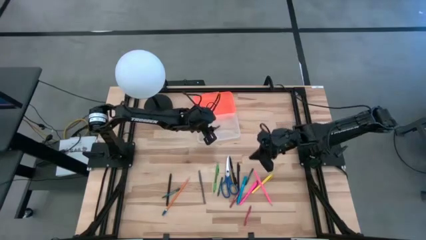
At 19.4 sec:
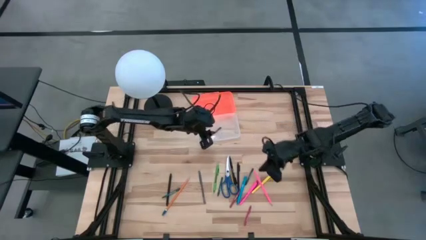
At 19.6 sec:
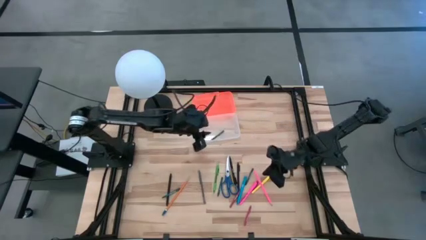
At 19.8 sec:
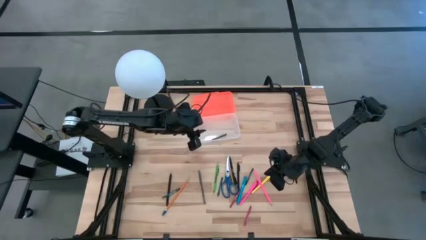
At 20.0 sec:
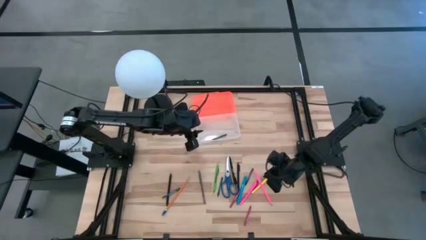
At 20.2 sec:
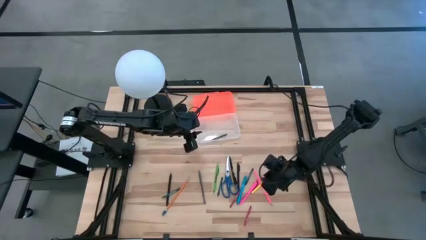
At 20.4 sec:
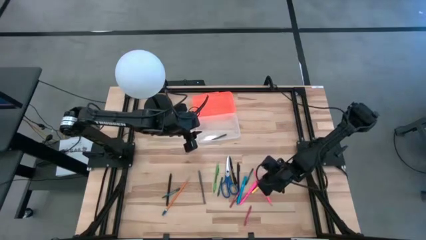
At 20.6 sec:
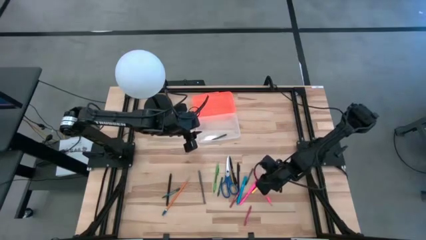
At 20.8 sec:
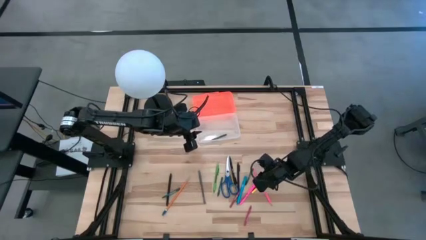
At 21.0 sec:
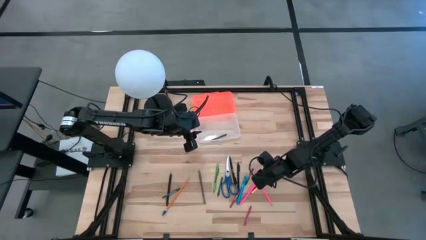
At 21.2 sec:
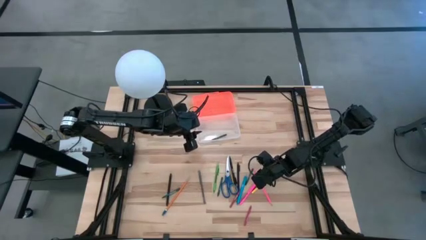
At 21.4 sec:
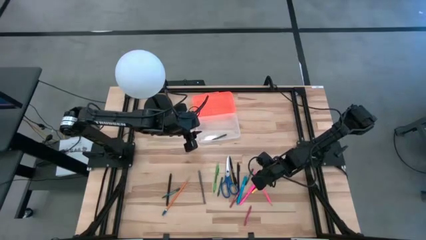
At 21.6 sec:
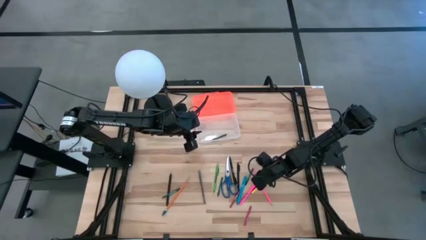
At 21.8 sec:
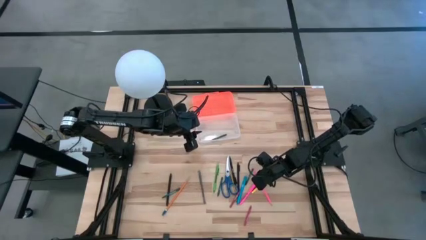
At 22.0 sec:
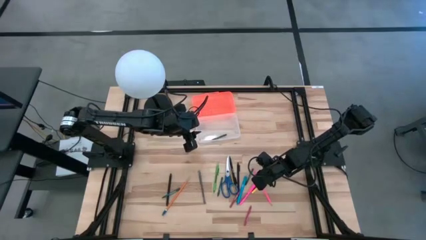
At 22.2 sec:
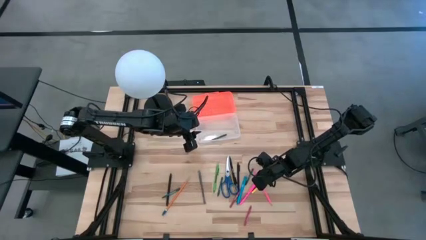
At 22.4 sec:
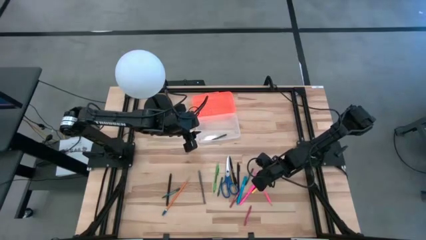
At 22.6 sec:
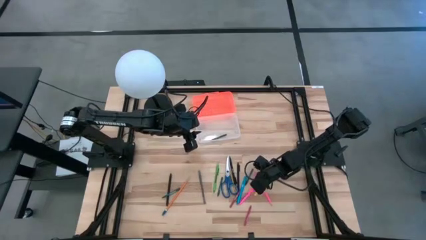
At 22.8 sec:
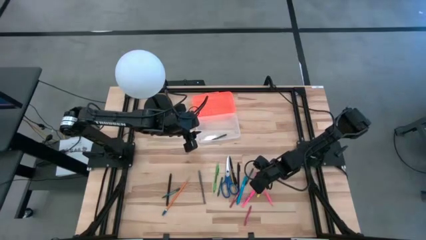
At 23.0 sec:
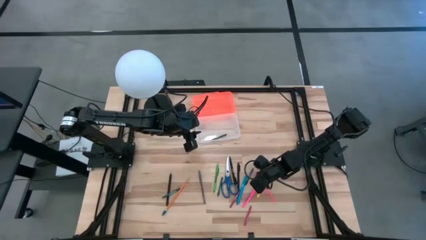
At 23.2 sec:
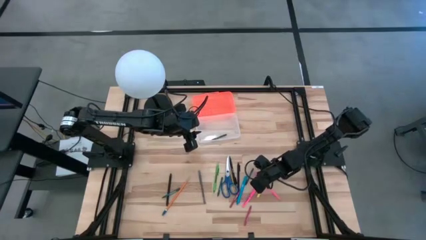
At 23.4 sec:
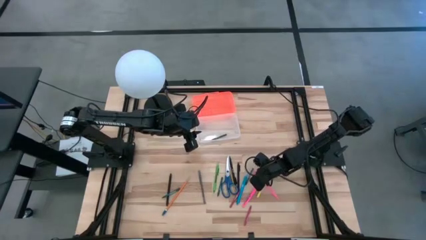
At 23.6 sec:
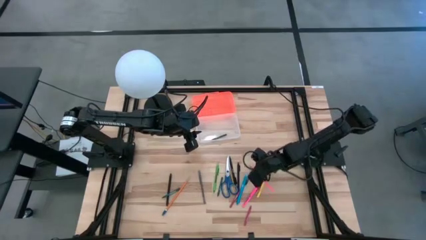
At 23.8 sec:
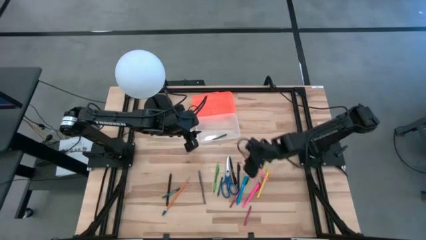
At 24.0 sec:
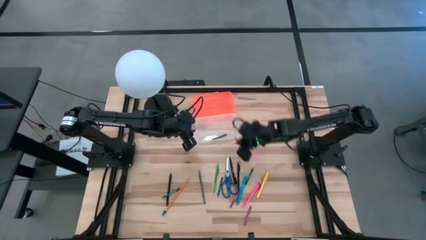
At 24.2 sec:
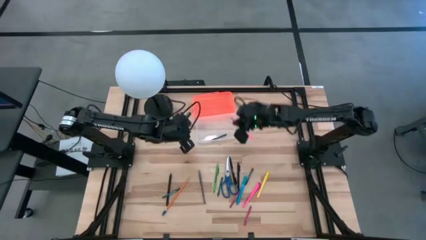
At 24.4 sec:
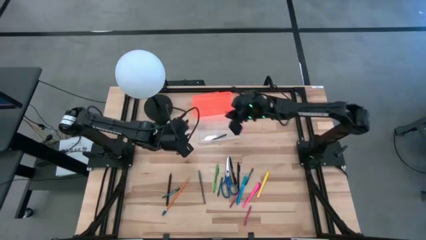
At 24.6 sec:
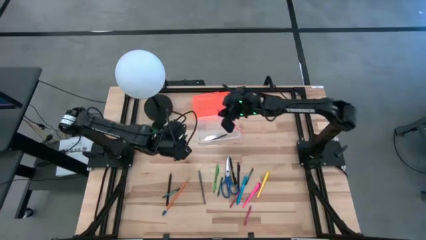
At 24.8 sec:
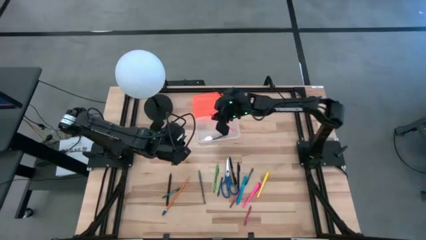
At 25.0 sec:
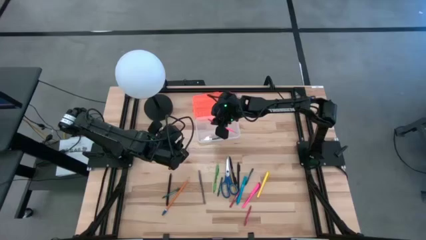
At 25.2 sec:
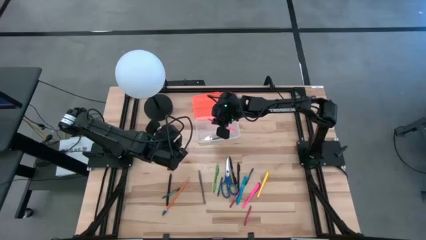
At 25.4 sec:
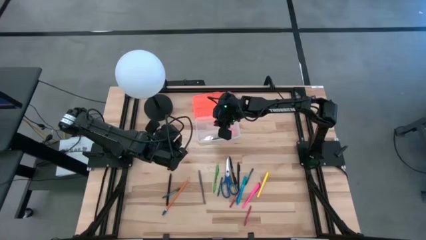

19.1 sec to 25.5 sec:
Task: Pick & place school supplies into a supply box
Put the right pink pencil into the supply box

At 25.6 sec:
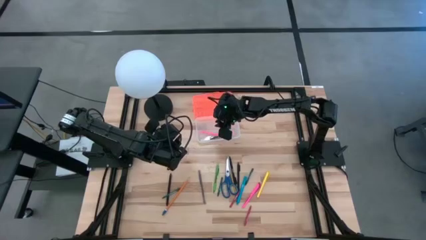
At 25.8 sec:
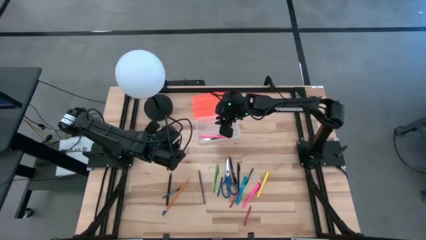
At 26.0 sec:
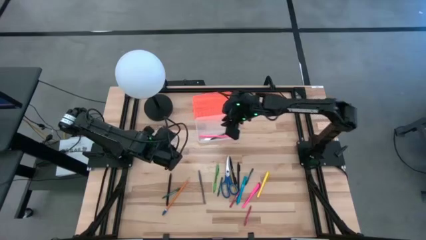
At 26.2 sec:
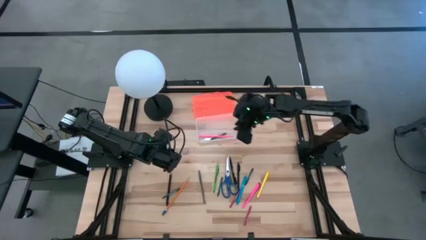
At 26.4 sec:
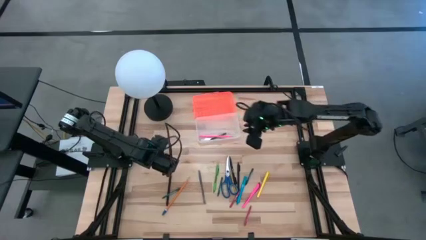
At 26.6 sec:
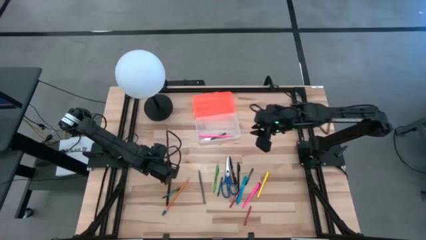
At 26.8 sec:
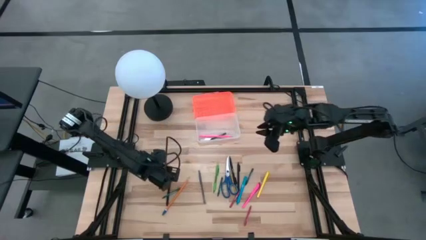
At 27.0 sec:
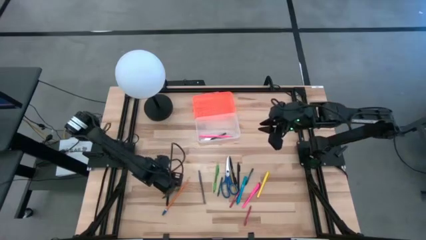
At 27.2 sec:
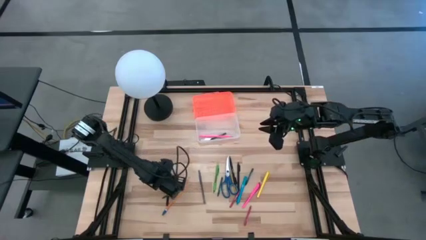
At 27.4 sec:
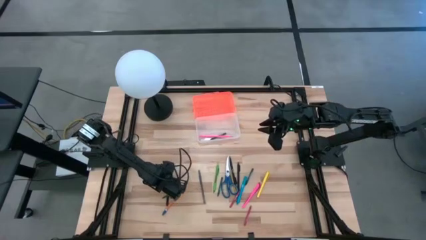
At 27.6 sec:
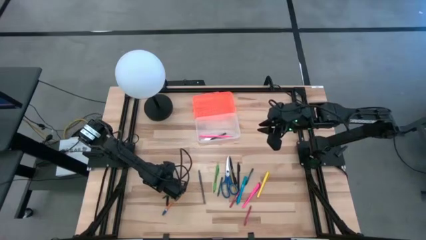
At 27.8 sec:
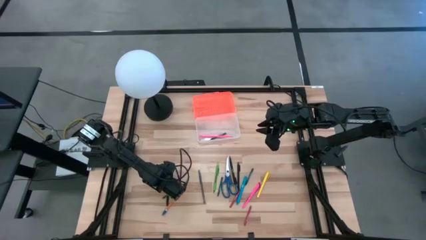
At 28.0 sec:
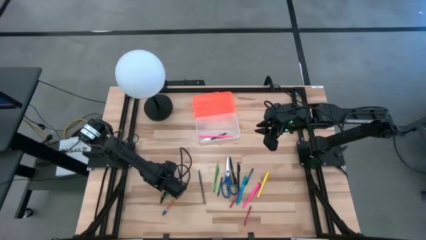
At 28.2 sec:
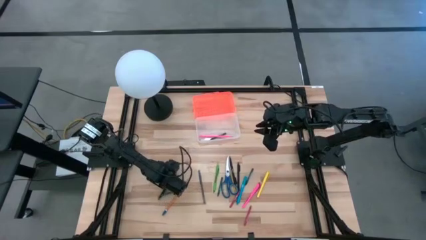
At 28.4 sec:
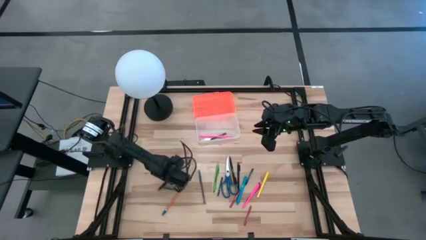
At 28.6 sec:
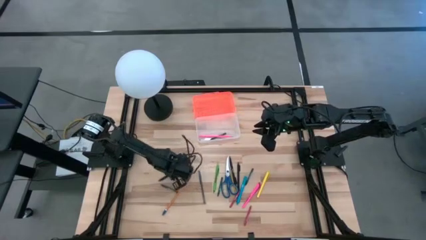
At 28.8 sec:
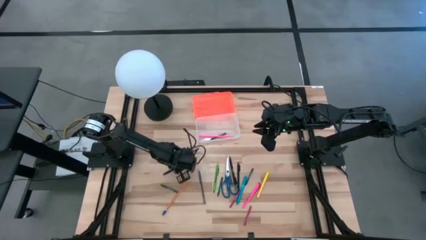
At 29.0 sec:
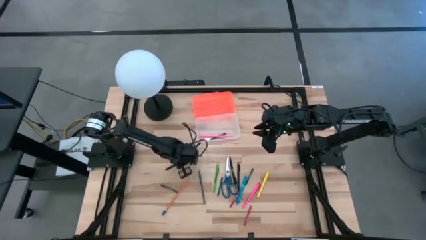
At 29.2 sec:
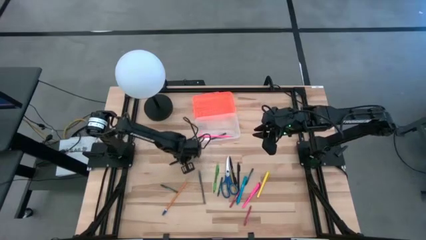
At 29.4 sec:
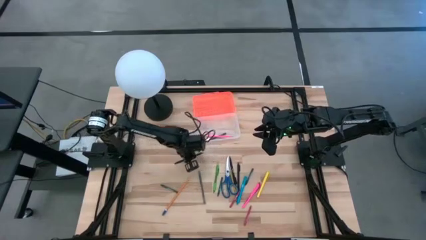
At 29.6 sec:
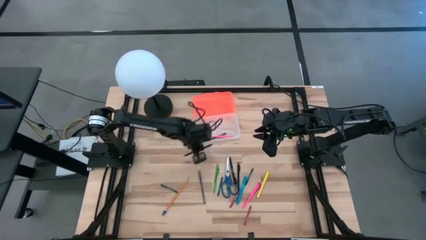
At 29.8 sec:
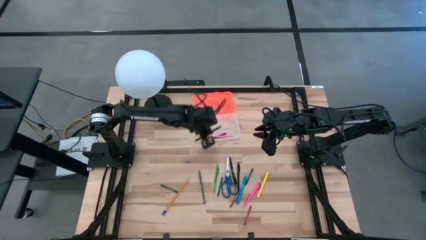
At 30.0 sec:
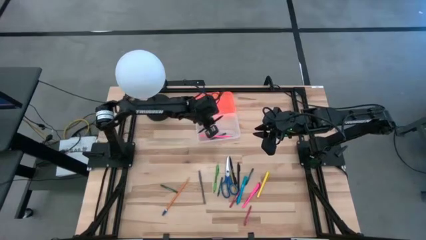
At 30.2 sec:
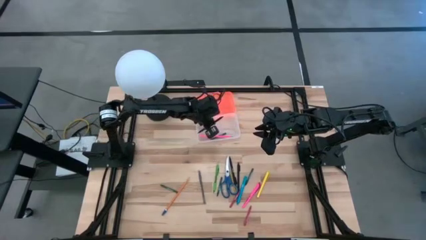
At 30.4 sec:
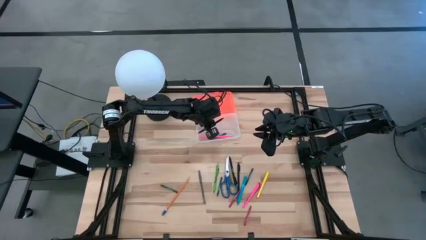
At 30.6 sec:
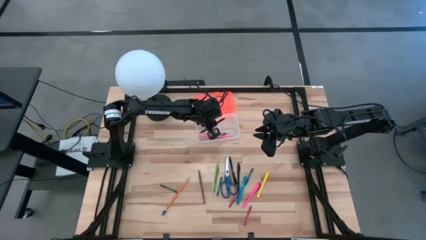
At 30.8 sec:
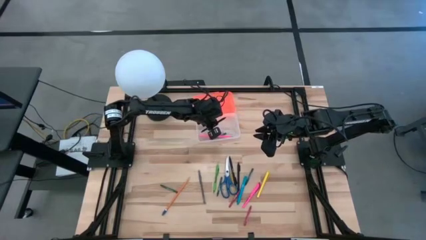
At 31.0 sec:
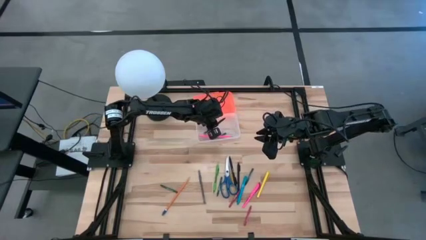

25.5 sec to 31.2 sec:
Put the left black pen into the supply box
